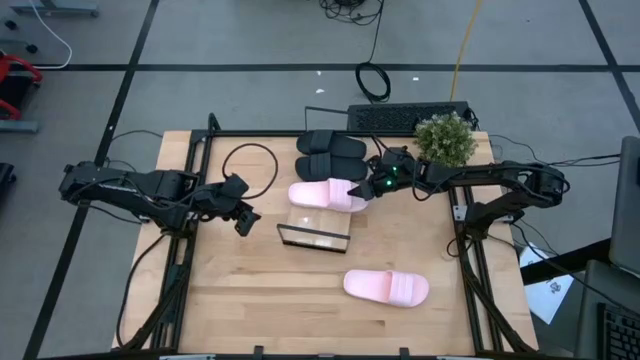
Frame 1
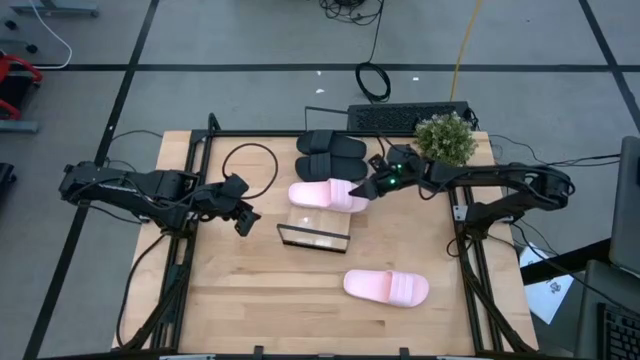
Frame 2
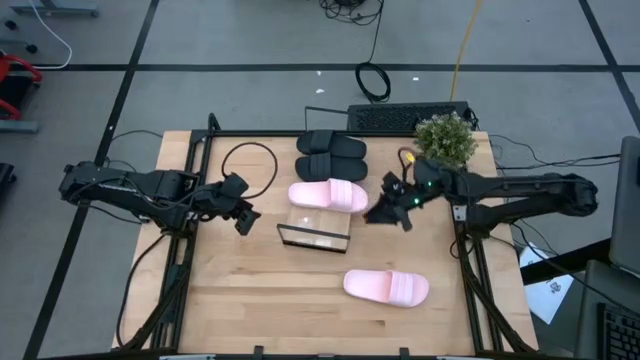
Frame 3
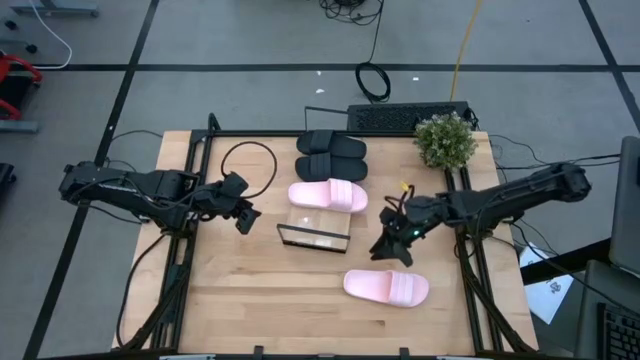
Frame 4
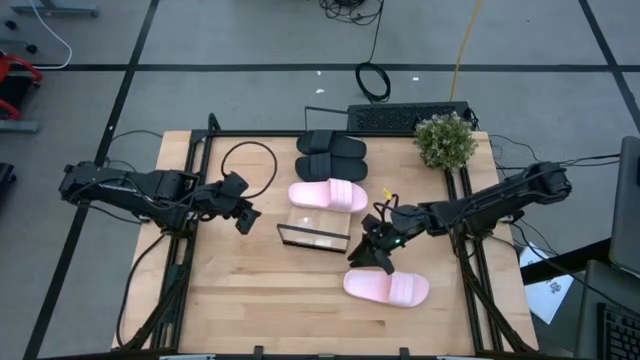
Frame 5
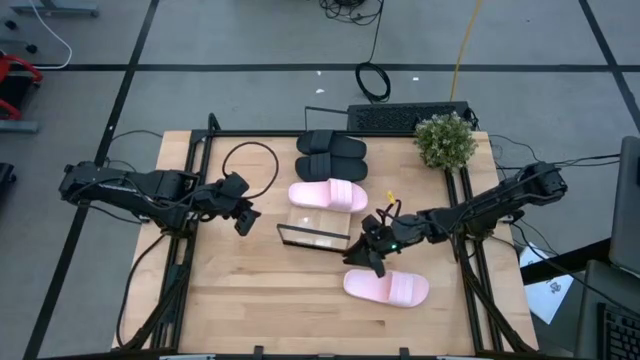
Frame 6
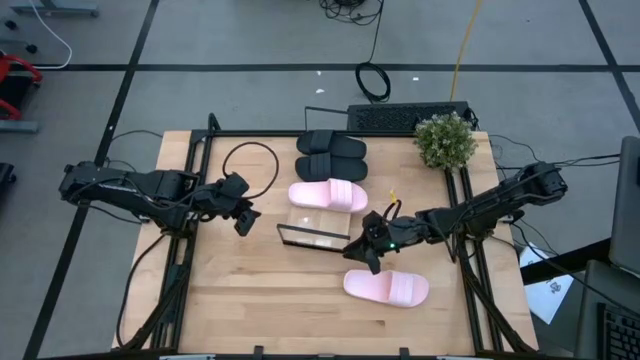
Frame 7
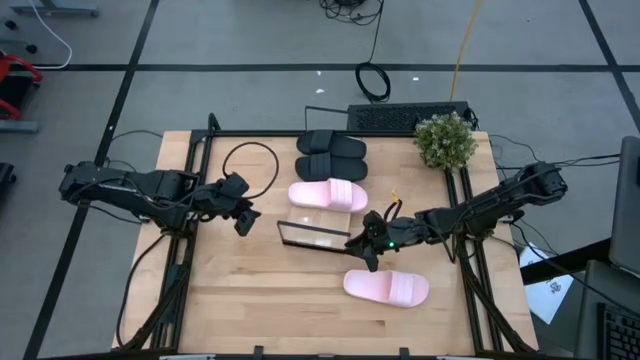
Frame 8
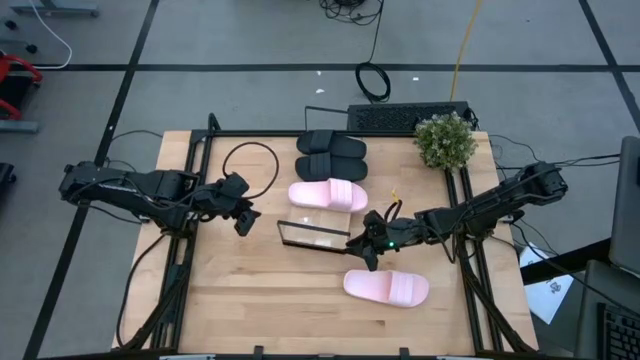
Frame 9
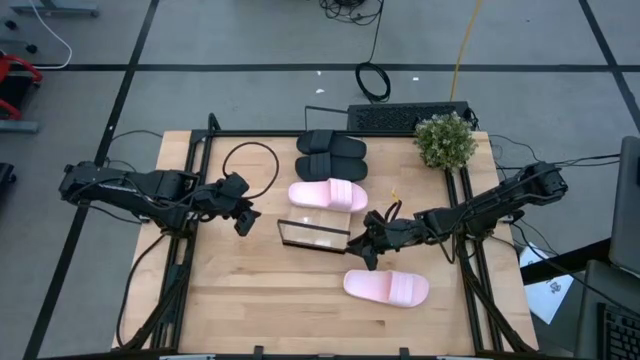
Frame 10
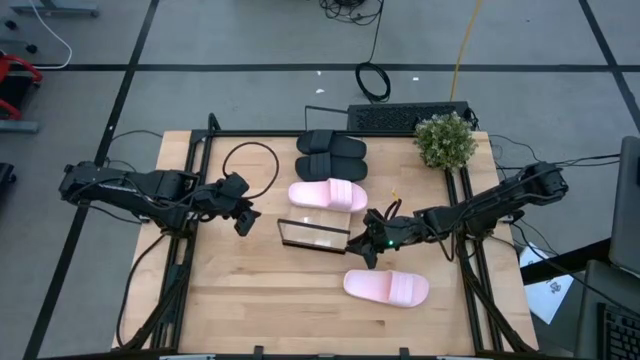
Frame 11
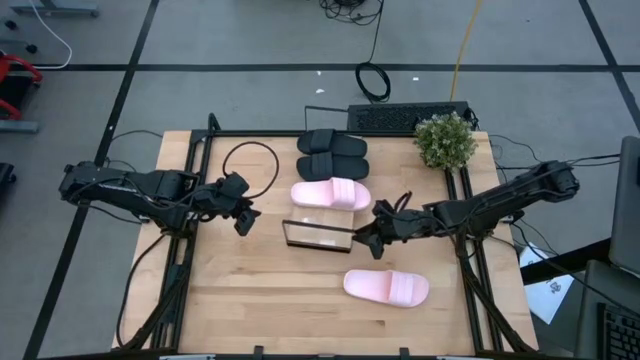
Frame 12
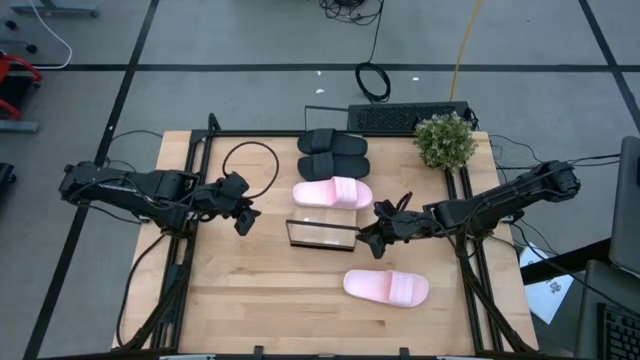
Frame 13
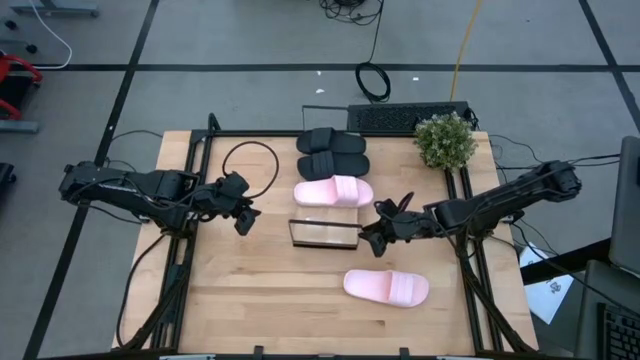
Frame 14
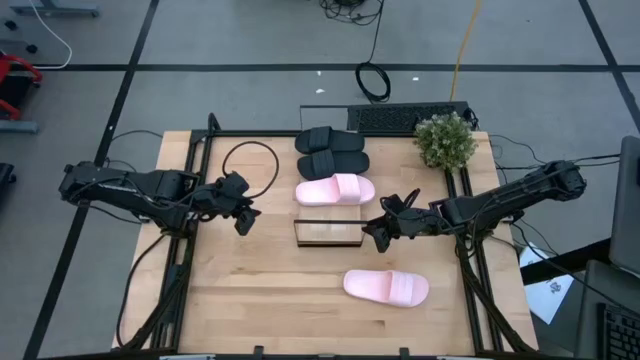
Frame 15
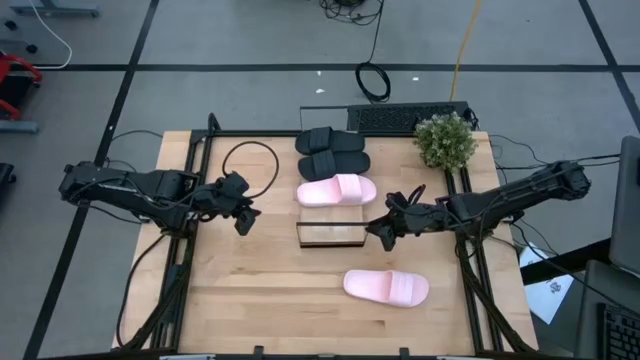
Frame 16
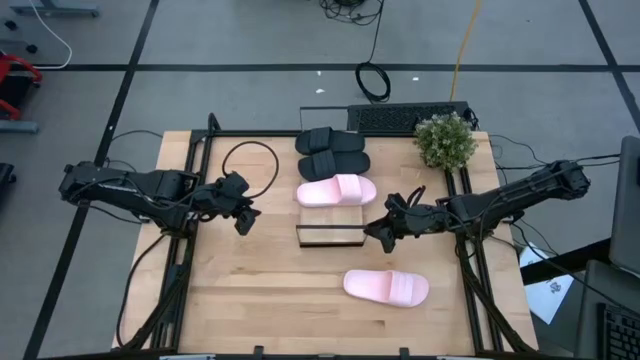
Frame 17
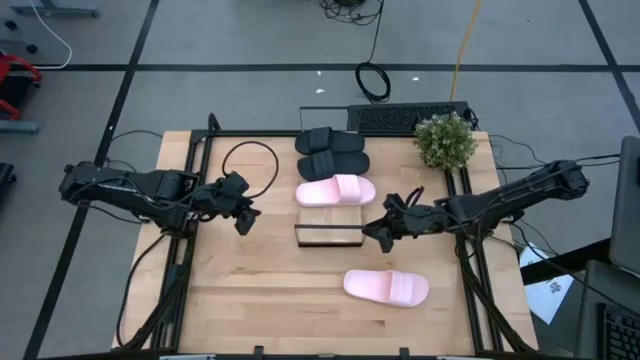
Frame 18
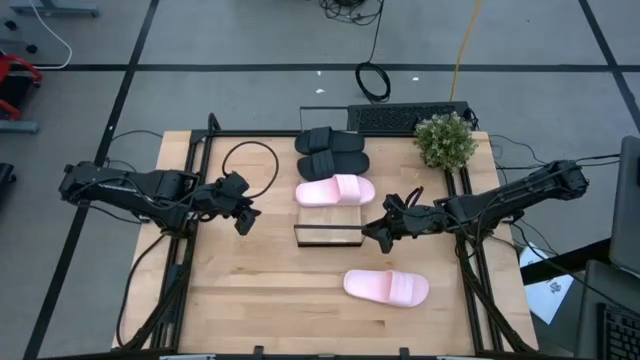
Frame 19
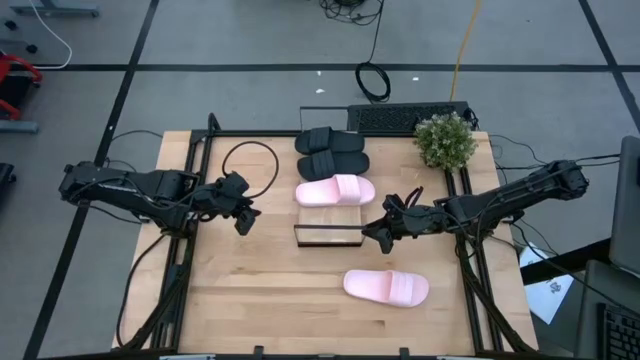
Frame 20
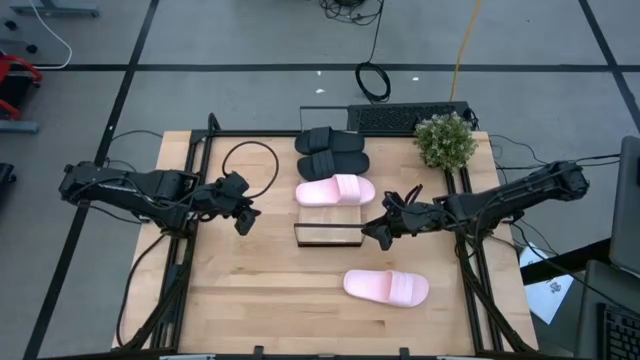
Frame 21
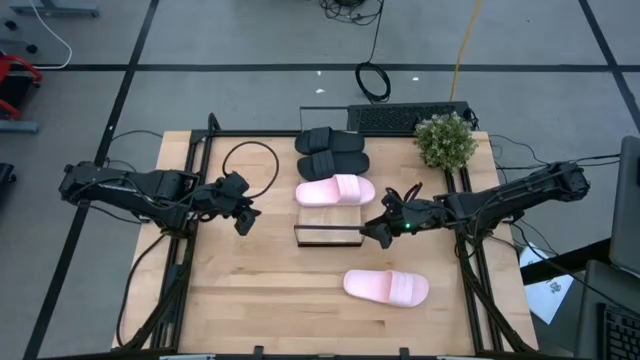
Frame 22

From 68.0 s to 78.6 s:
Task: Pick and place slides into the shelf
Adjust the shelf

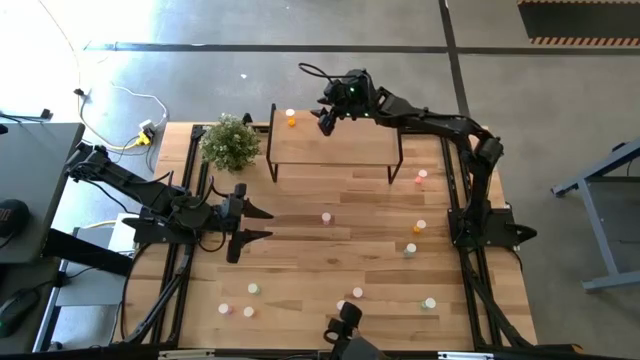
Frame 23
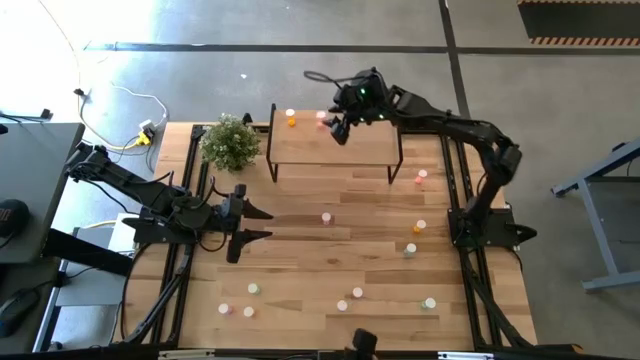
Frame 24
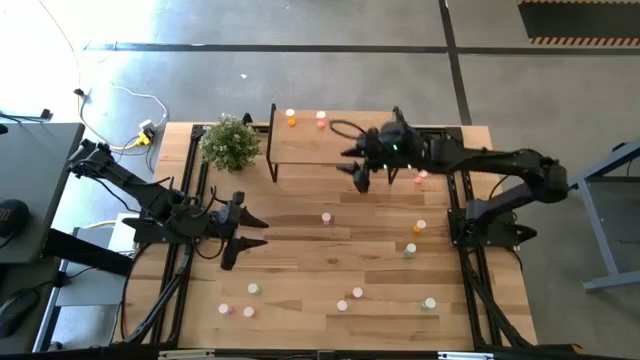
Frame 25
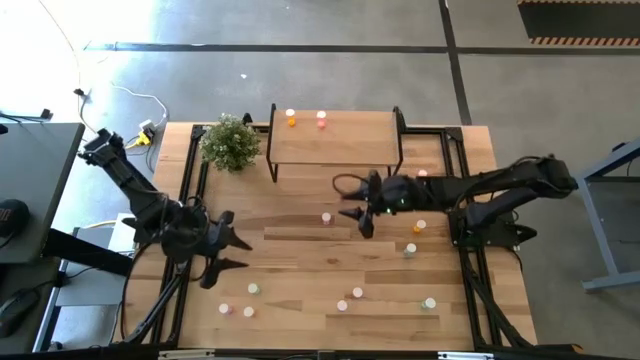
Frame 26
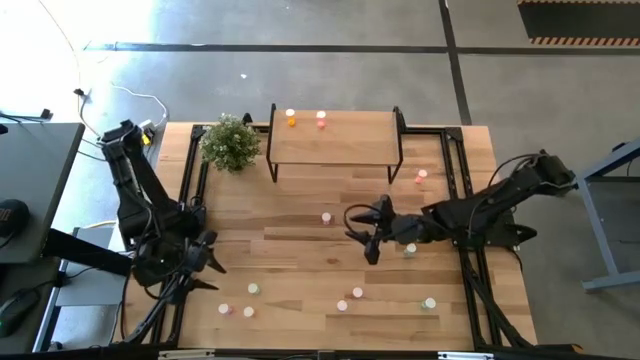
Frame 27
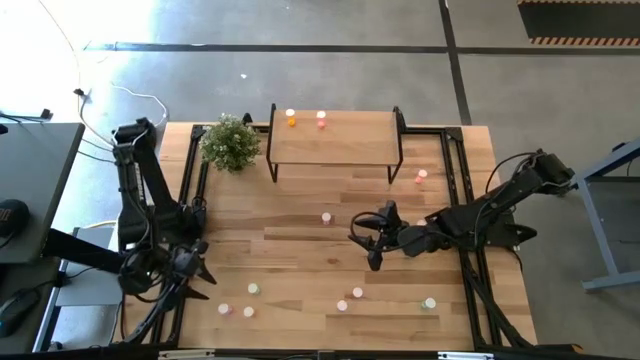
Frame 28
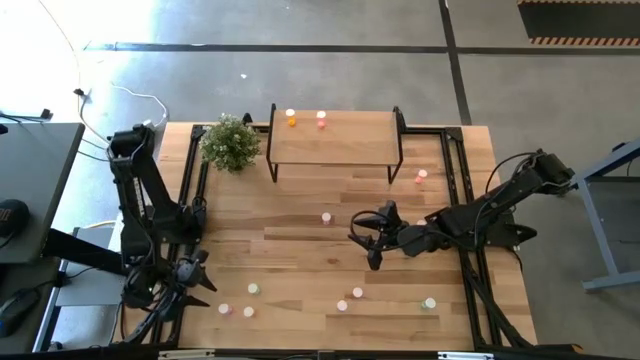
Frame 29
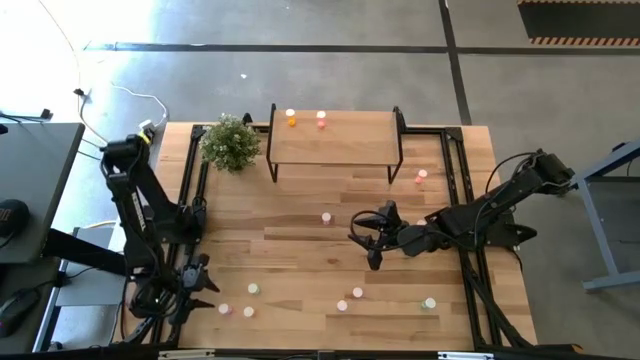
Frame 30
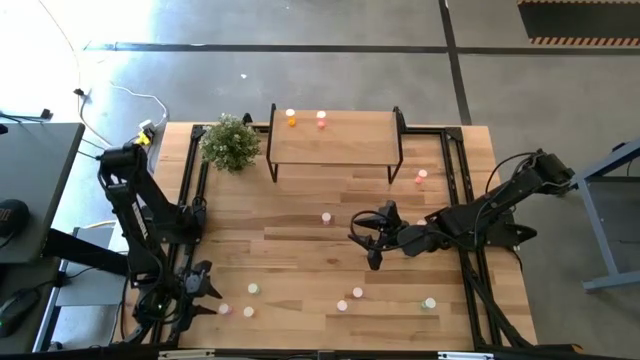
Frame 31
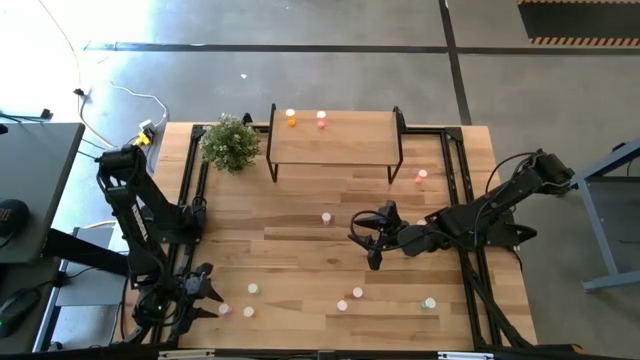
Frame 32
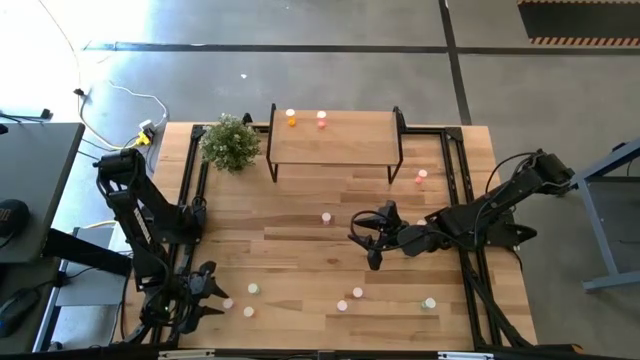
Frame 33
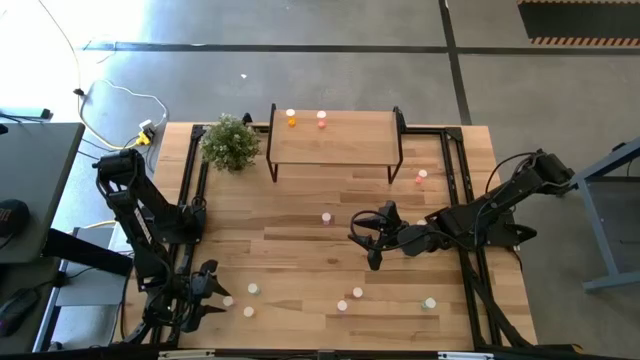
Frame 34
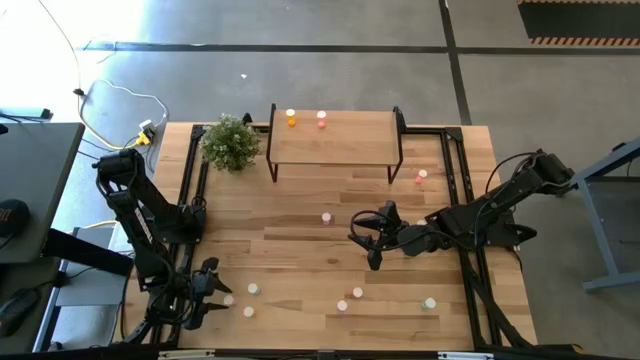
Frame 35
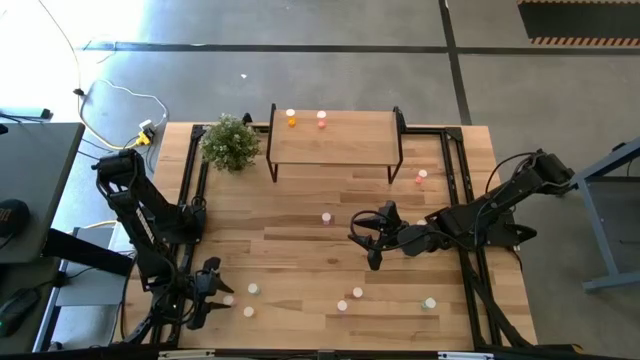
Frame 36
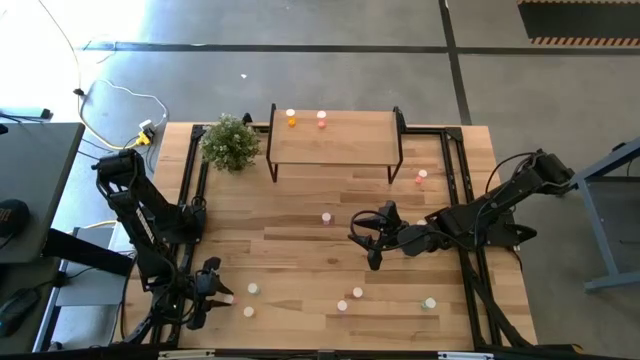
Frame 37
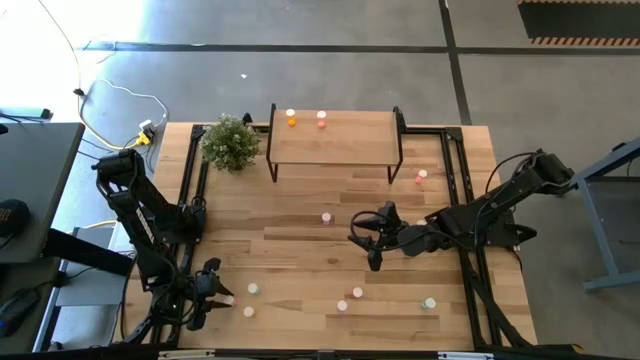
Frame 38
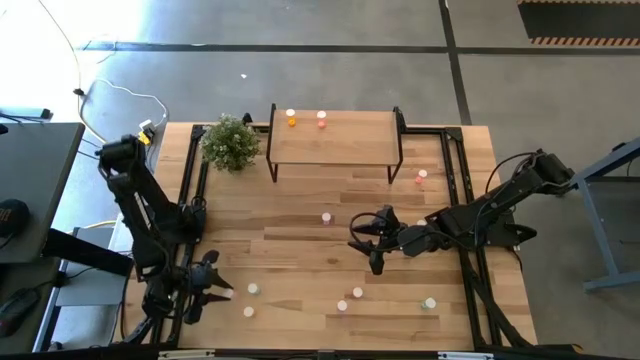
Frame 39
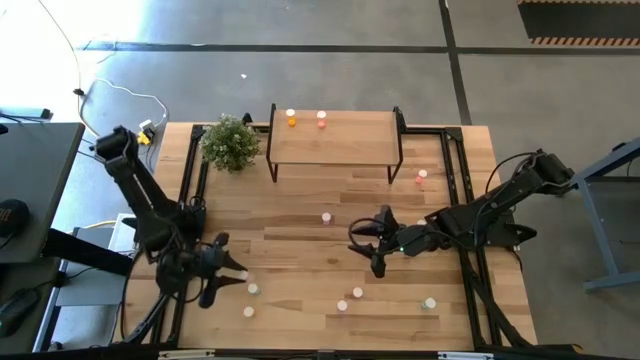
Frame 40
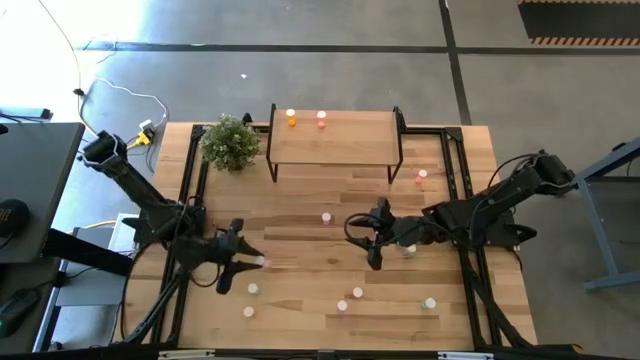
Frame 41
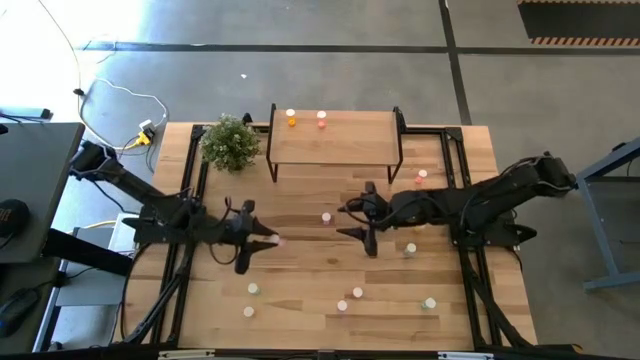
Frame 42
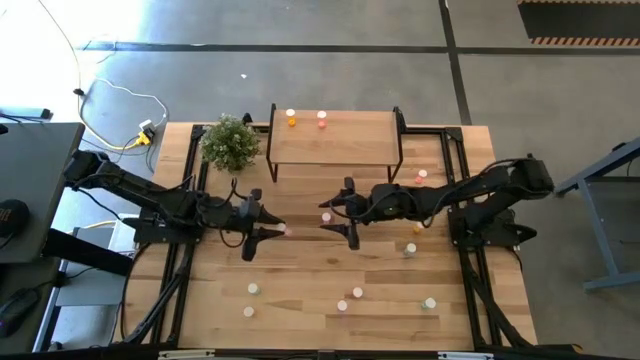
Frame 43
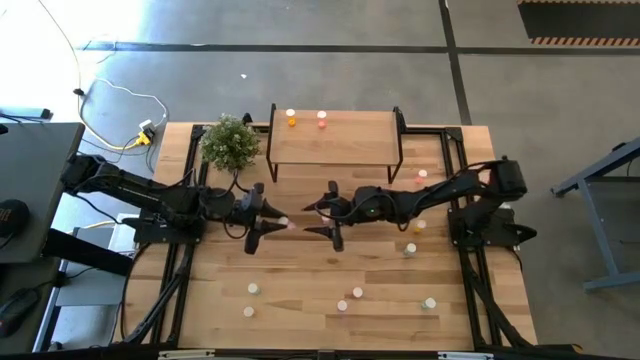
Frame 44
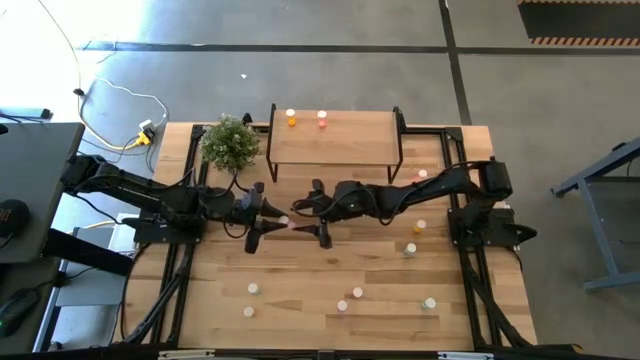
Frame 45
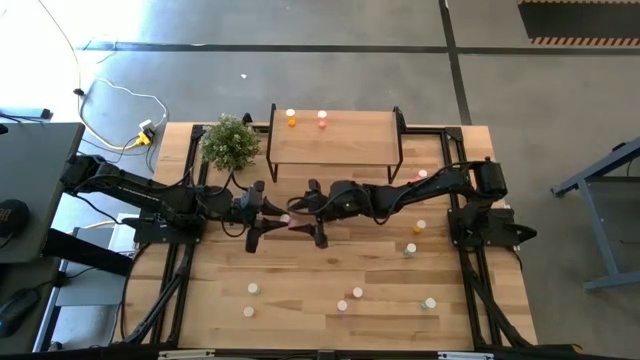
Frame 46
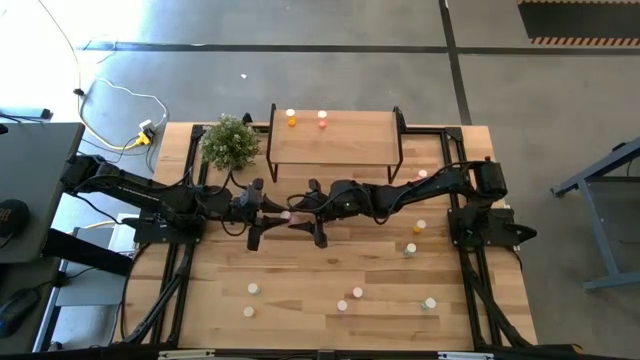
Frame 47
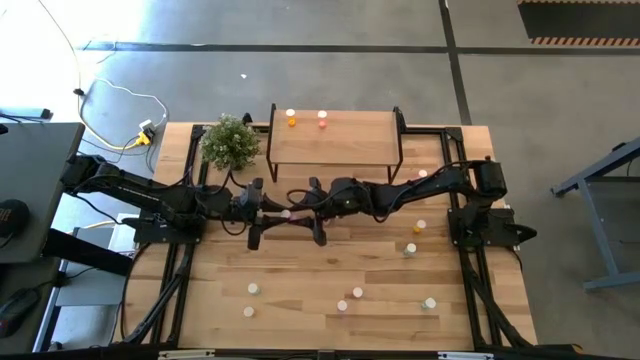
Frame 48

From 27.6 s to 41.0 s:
Task: Pick and place medicine bottles onto shelf by color
Put the bottom left purple pill bottle on the shelf
